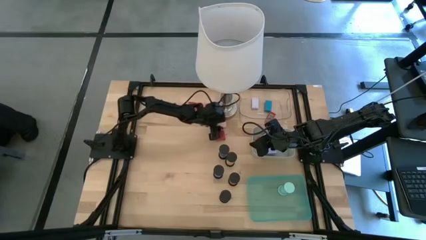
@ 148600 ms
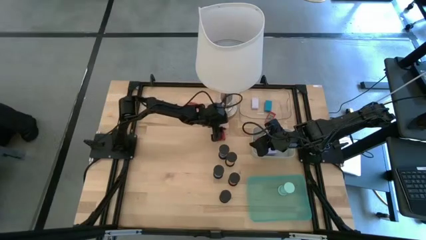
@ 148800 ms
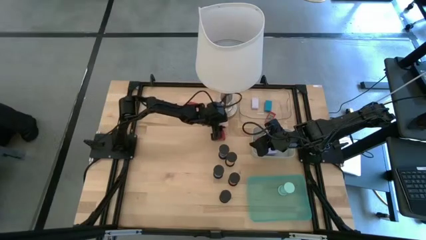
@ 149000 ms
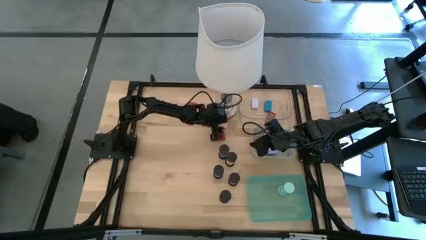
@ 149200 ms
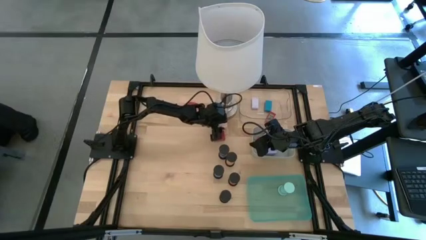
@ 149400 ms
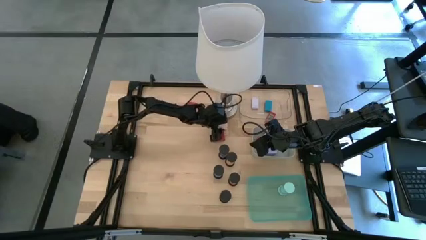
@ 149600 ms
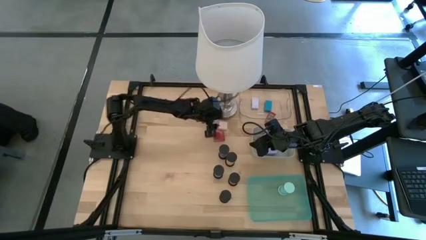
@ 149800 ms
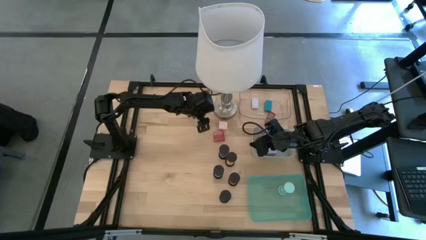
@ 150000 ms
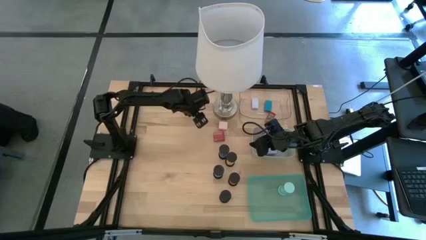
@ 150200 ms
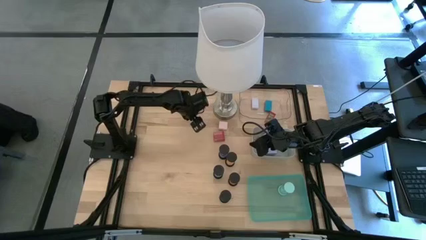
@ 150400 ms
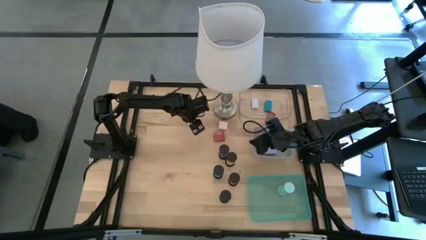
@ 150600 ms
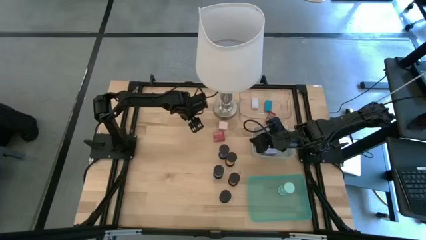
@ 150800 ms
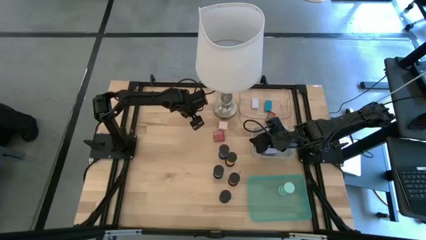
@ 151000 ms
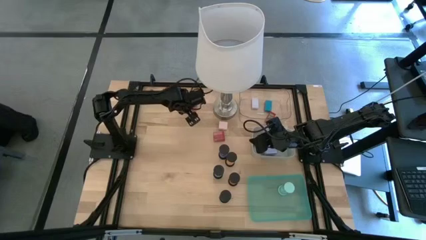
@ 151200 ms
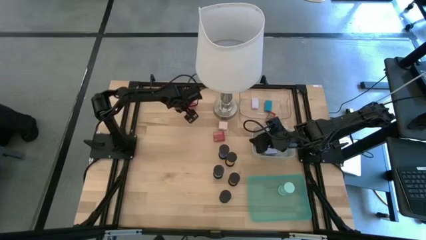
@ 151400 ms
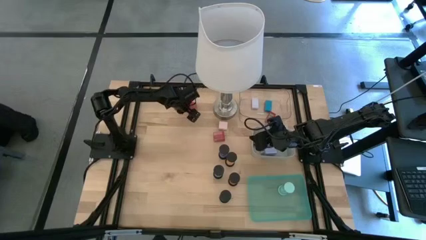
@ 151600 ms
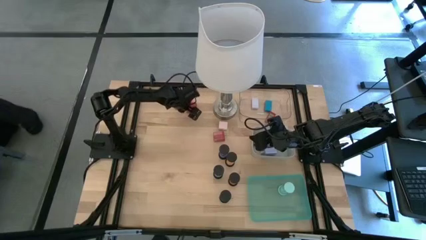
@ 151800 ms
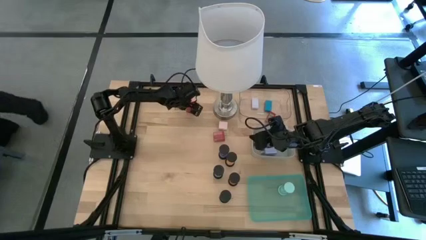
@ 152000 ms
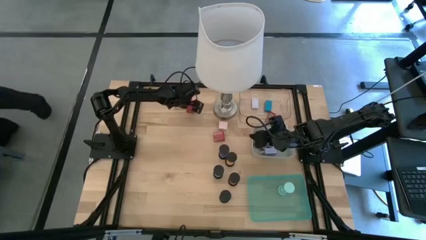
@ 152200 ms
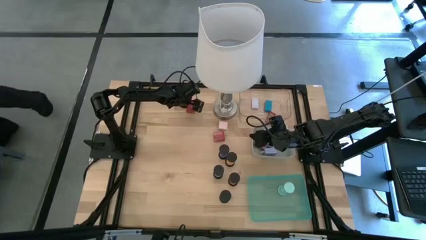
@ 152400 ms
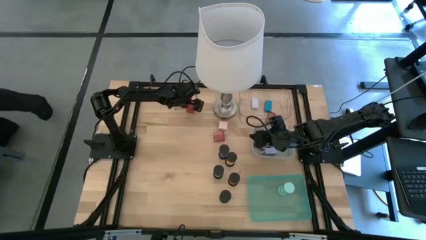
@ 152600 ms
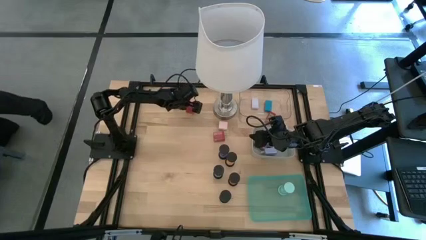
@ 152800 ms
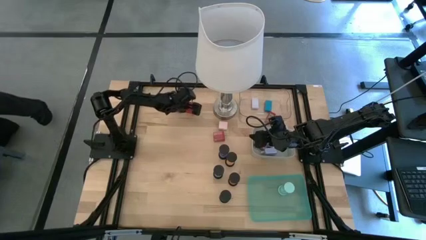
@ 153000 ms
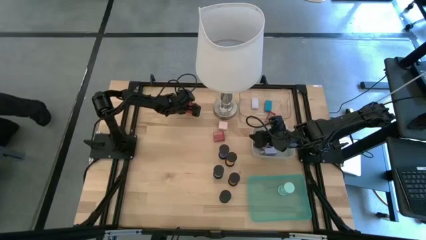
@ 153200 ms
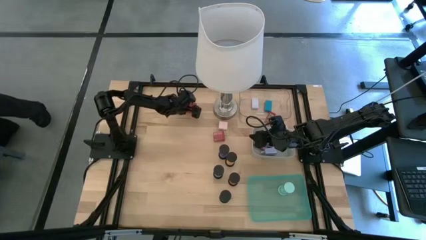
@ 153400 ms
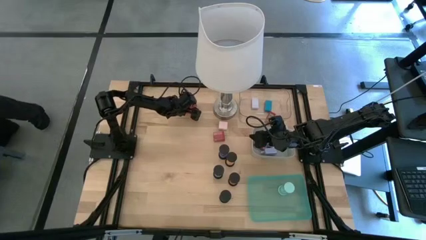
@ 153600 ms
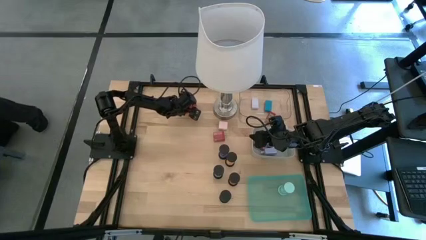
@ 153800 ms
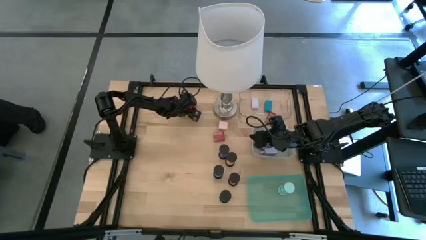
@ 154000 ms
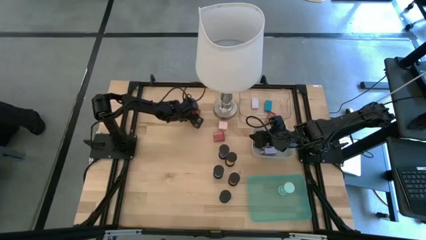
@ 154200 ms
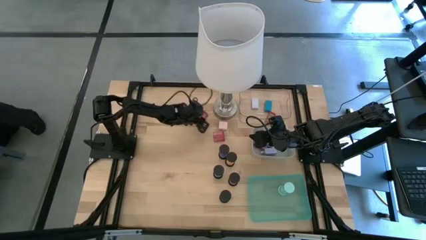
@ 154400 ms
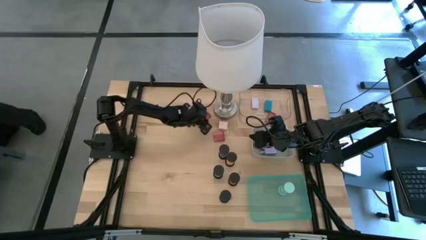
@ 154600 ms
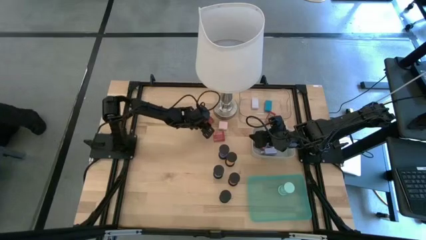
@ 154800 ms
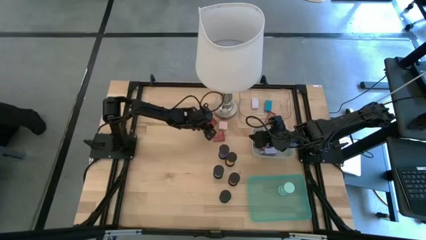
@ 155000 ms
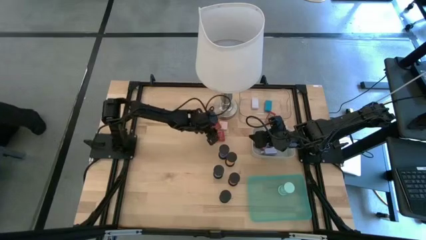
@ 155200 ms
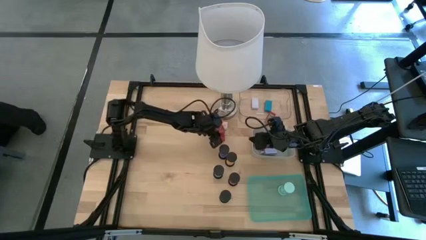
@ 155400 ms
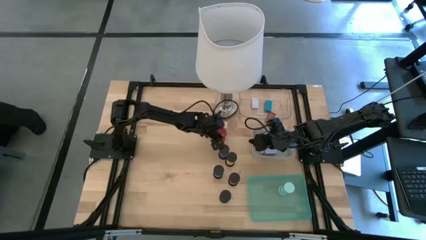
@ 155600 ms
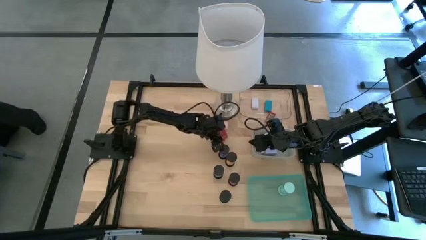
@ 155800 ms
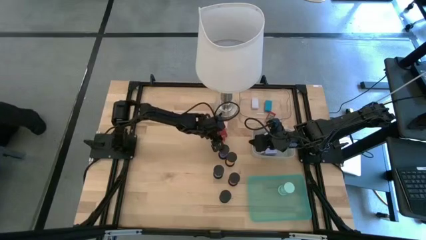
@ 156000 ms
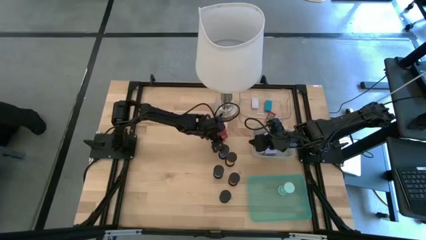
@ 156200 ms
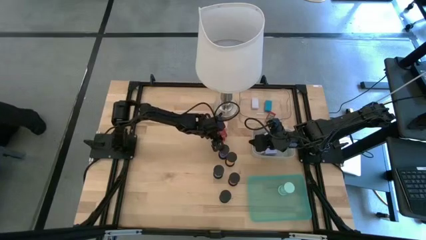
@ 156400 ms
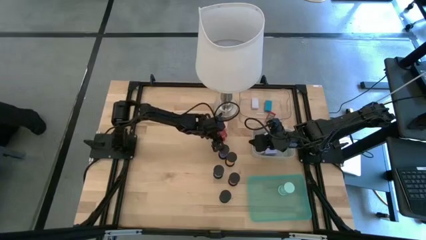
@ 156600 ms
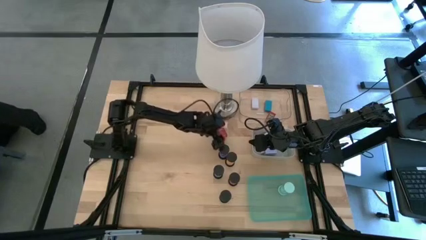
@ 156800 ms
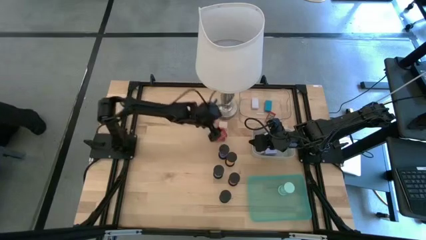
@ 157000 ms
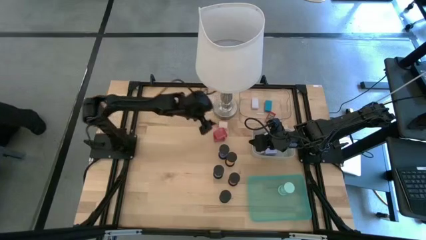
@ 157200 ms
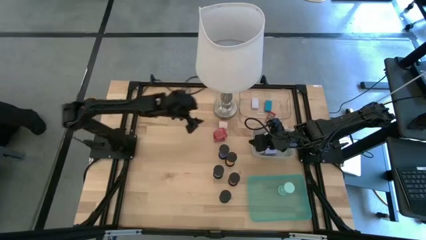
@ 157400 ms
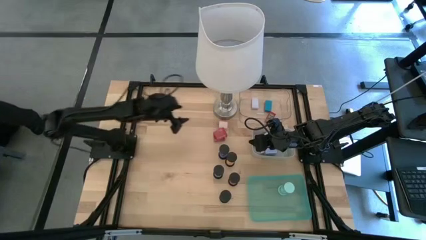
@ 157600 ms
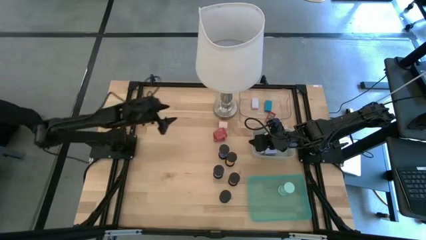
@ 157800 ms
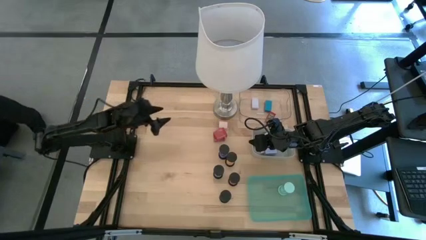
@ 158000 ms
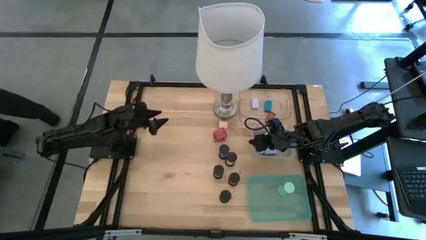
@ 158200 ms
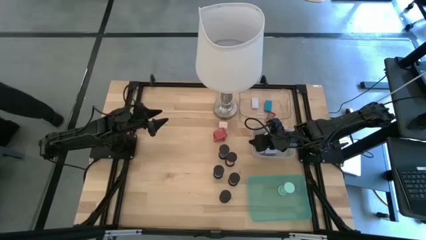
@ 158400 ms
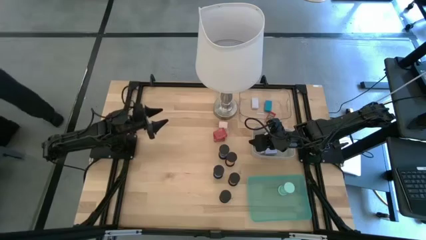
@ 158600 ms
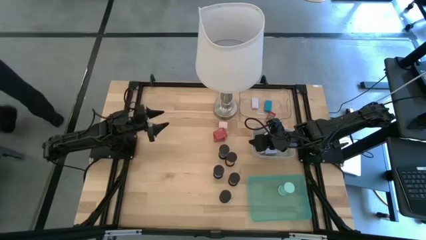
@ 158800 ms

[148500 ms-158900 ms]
Task: Pick & Place Office items
Move the charger adapters to the middle of the table
